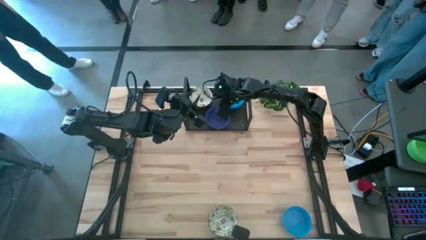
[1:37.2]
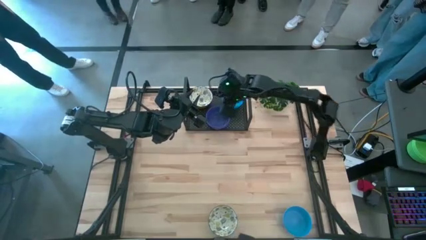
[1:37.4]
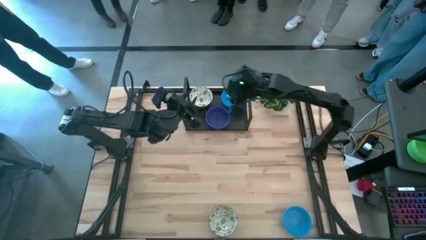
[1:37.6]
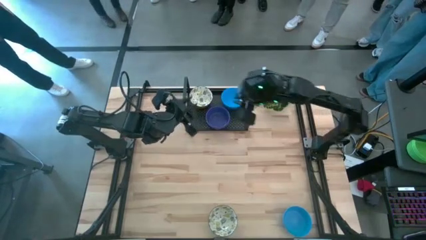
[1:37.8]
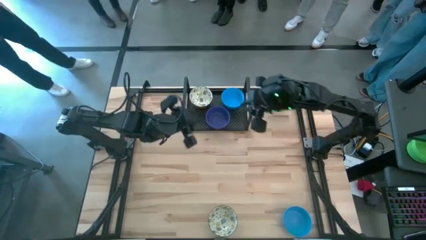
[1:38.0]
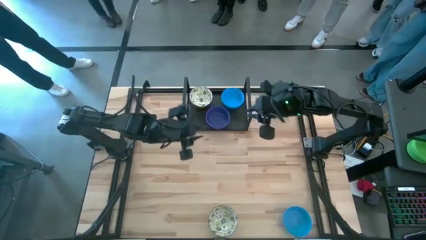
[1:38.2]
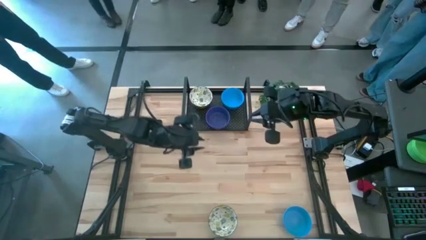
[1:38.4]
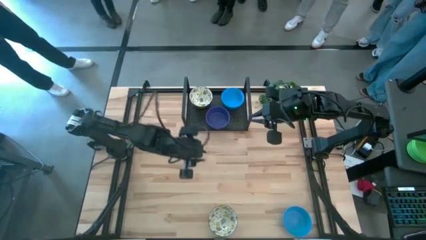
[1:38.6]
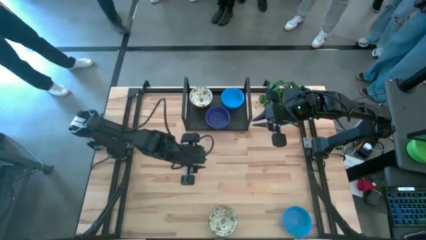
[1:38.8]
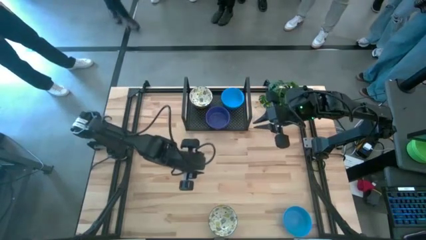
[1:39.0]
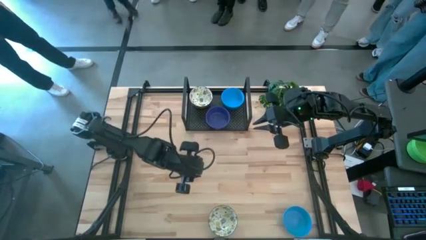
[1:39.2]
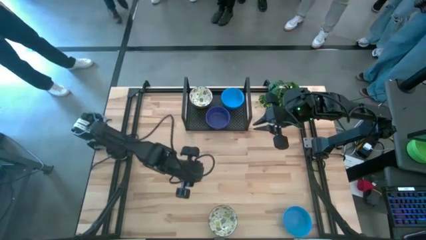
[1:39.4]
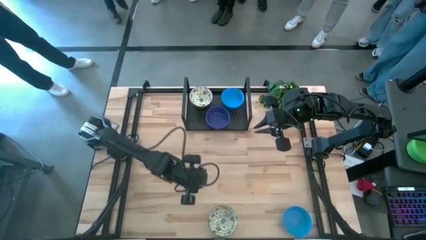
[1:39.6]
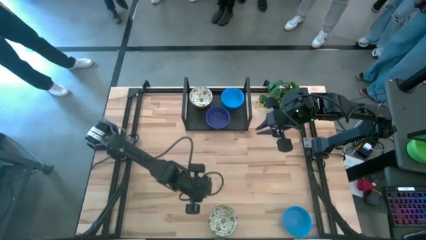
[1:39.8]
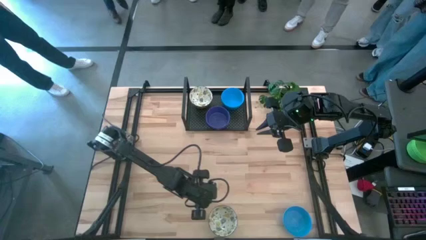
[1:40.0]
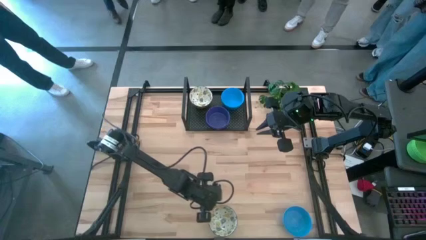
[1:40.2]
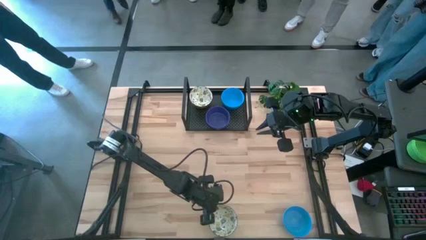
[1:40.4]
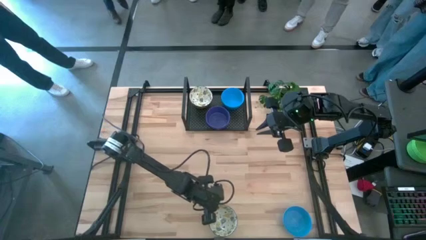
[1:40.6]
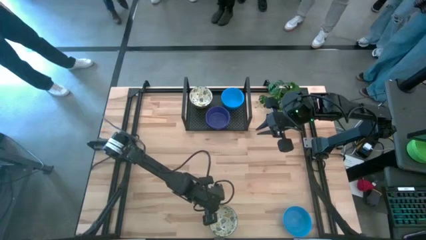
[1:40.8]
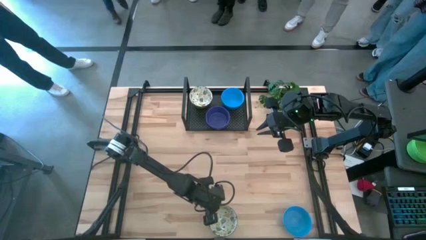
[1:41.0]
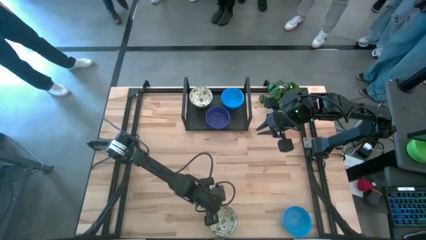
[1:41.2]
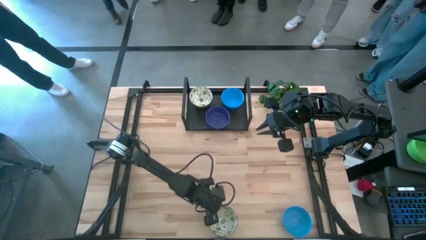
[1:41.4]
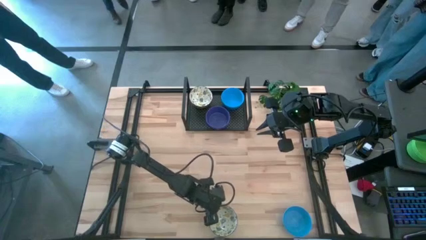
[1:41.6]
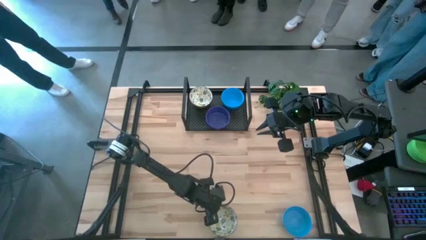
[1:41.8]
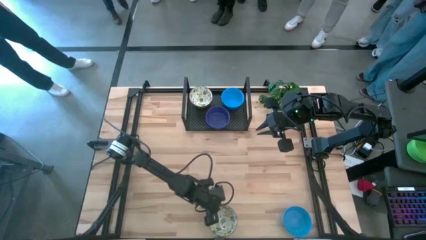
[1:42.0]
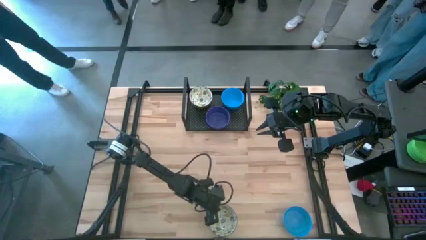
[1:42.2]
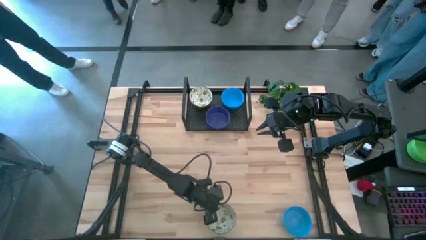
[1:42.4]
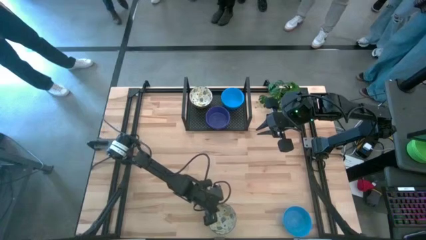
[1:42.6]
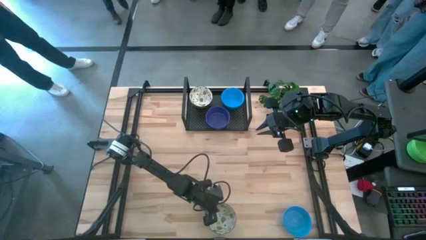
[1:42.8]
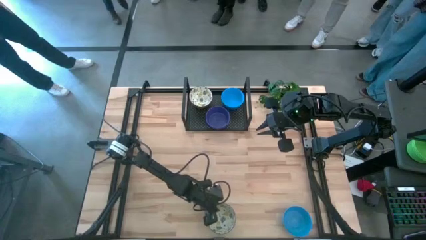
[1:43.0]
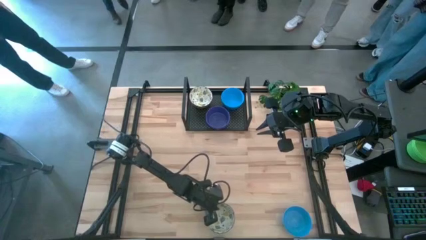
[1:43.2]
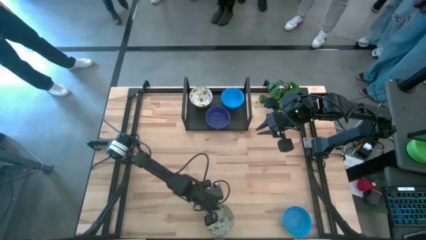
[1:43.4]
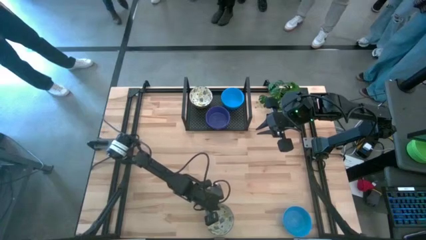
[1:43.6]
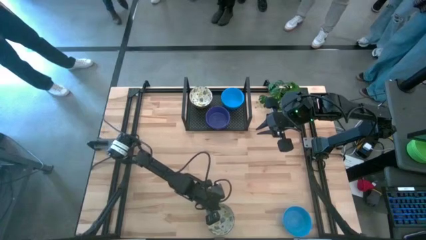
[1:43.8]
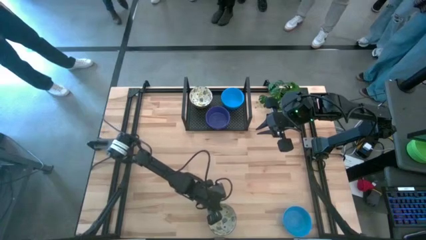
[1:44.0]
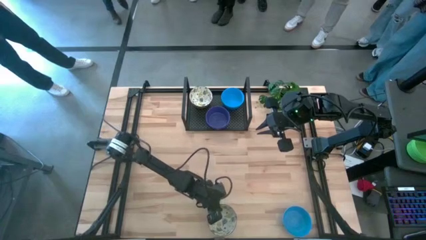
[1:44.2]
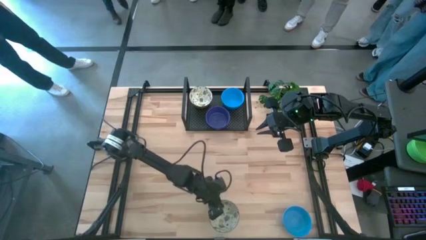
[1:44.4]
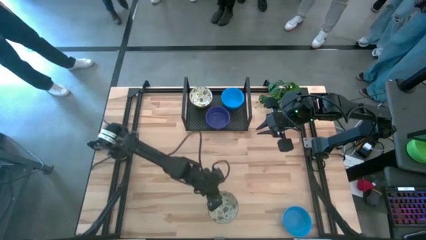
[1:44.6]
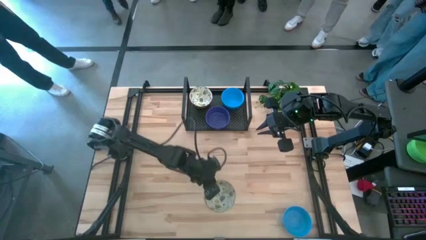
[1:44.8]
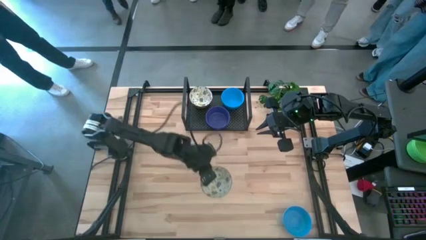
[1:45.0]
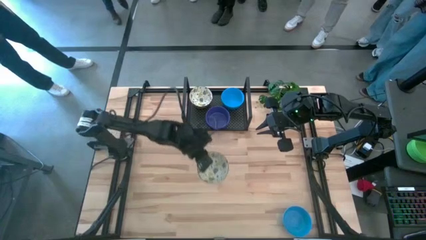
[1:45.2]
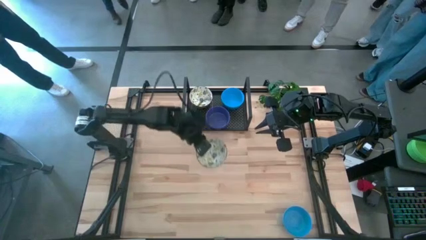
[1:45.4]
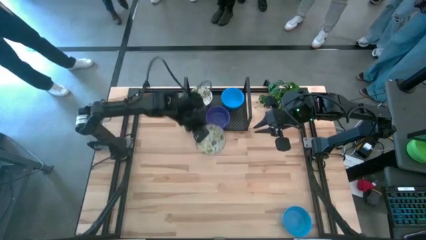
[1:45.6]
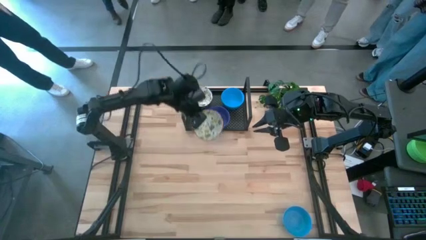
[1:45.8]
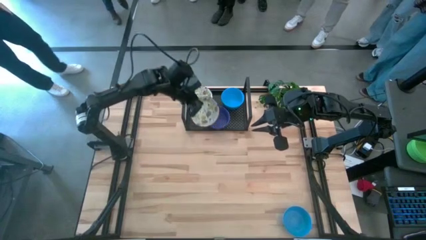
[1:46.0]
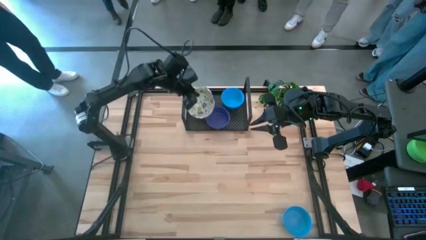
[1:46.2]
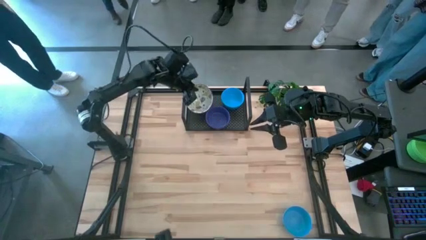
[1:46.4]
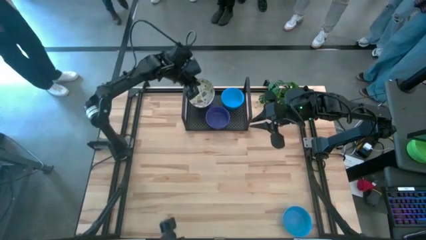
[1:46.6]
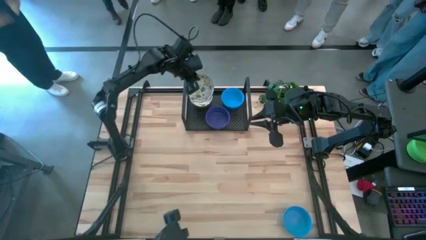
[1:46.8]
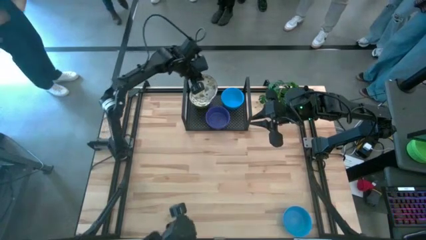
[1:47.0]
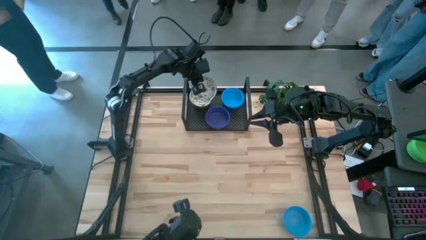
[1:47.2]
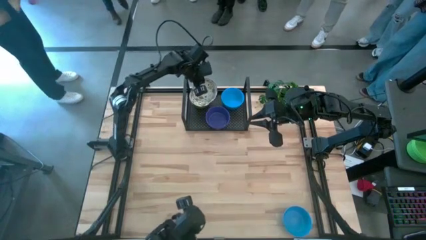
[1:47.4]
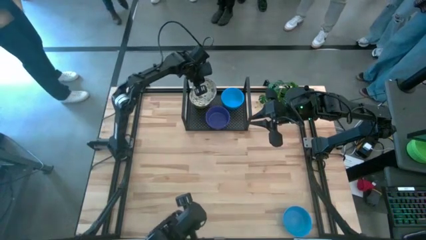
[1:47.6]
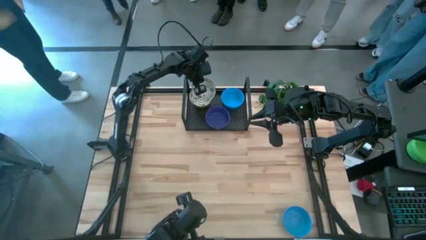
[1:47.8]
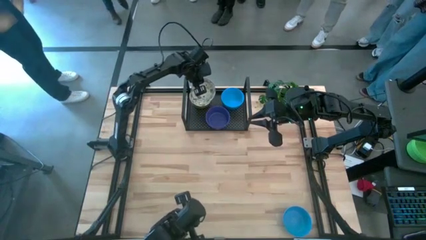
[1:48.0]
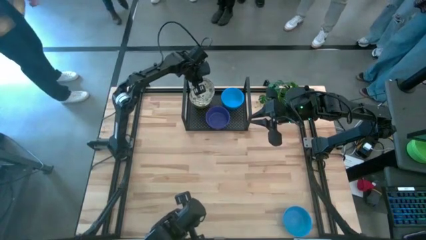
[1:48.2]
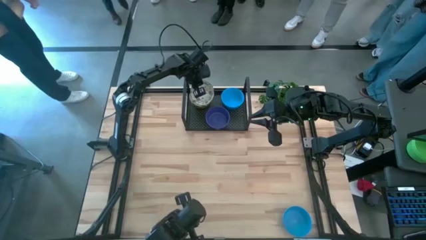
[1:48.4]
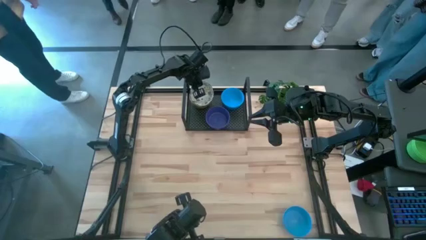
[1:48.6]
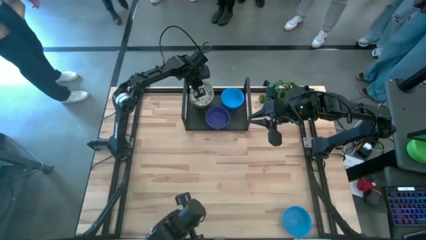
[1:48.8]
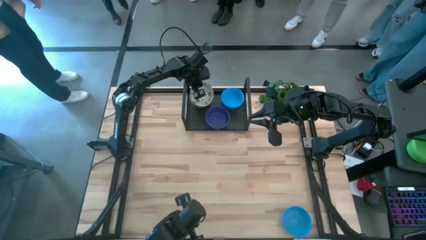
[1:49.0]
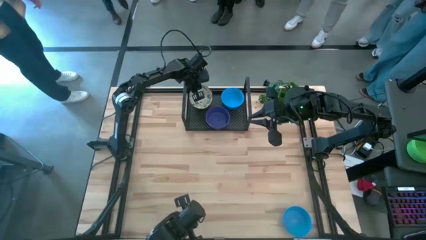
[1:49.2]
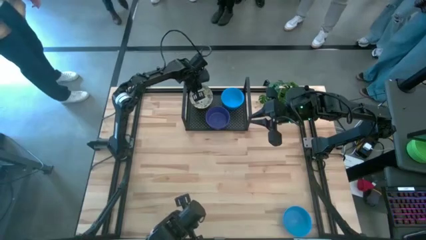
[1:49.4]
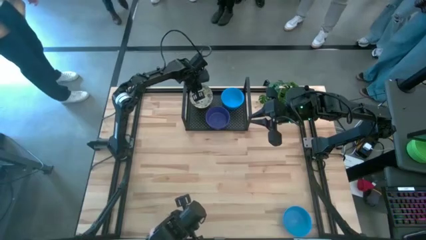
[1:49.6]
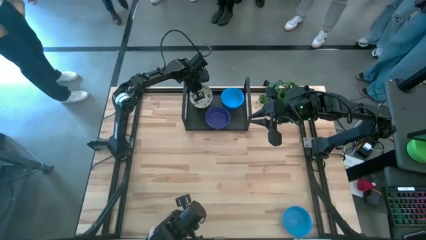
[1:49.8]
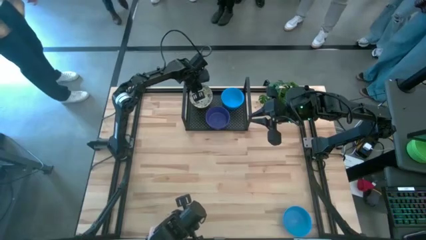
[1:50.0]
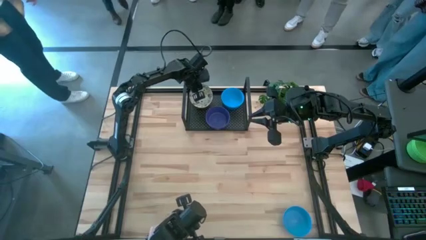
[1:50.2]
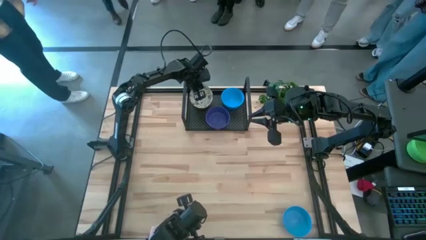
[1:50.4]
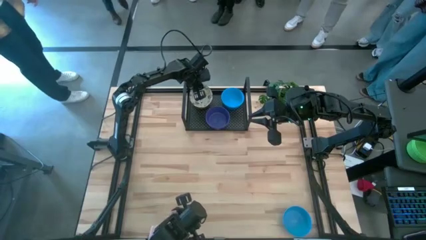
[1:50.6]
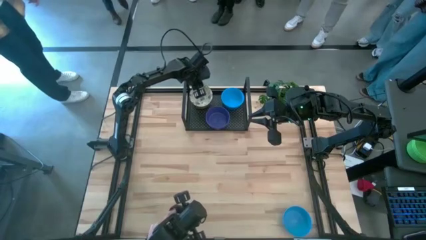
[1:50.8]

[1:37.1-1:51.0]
Task: Pick & Place Mini bowls
Stack the white bowl on top of the white bowls on the shelf

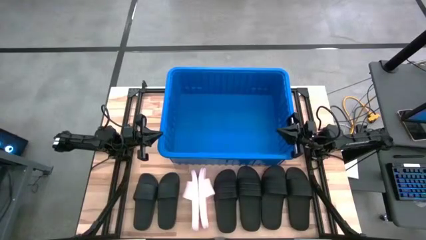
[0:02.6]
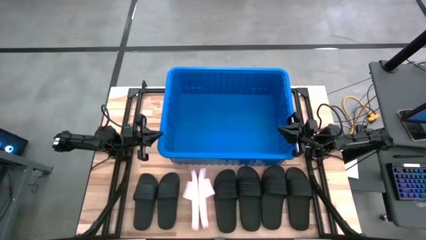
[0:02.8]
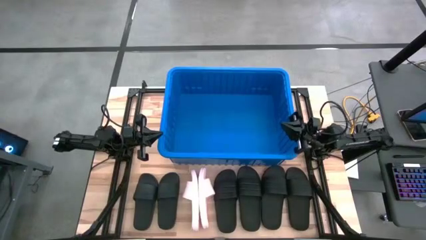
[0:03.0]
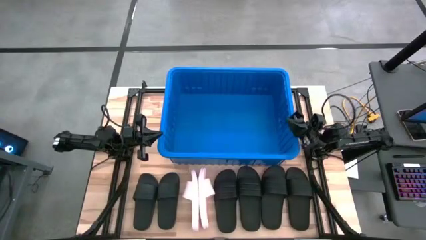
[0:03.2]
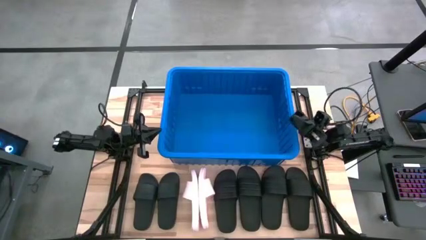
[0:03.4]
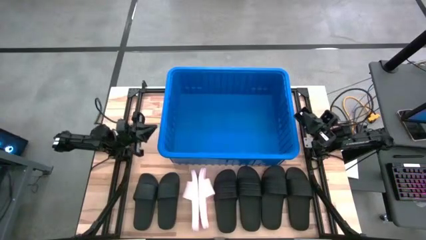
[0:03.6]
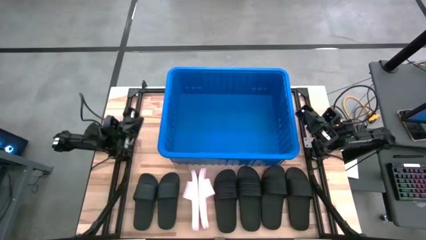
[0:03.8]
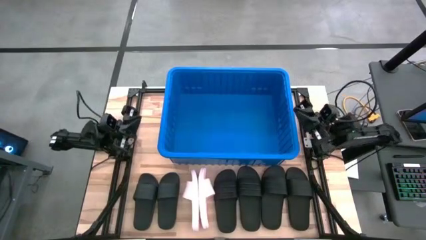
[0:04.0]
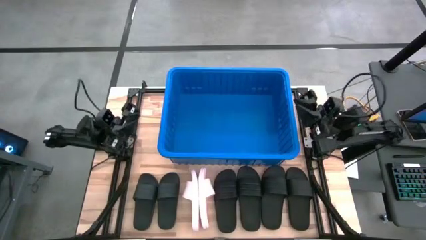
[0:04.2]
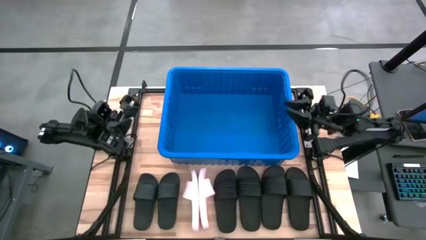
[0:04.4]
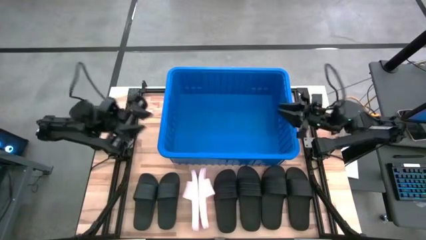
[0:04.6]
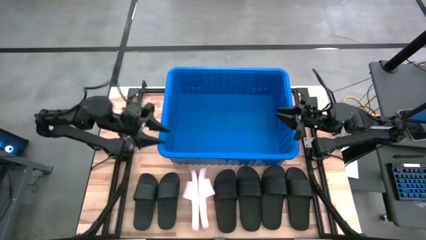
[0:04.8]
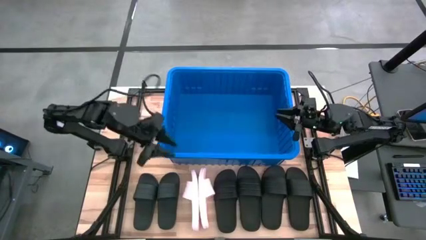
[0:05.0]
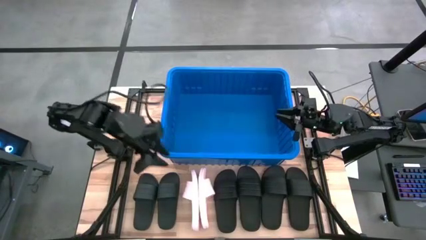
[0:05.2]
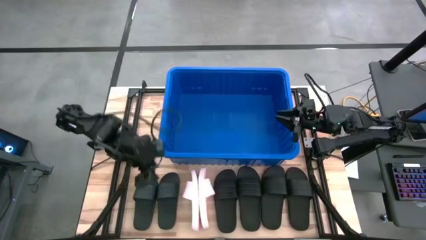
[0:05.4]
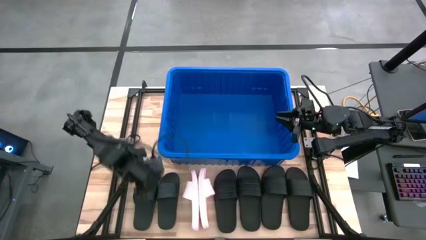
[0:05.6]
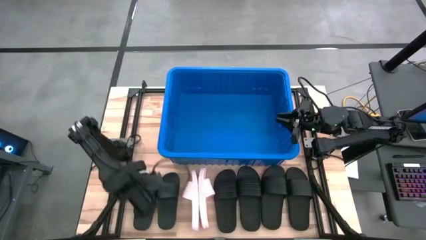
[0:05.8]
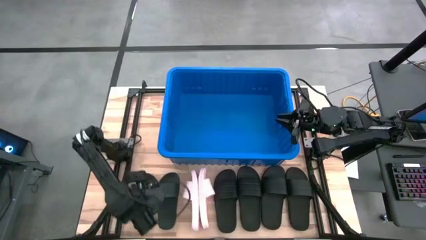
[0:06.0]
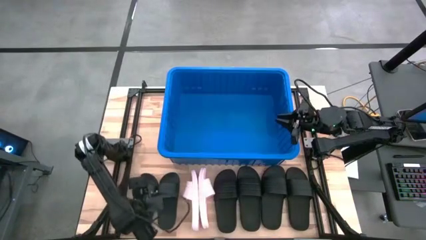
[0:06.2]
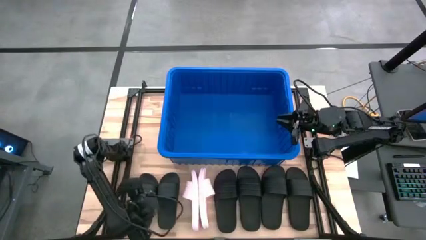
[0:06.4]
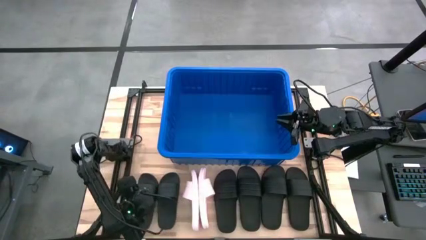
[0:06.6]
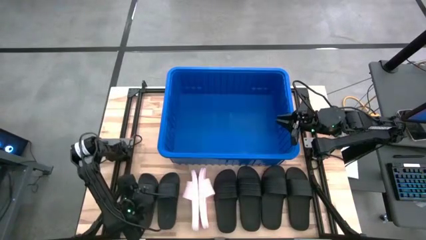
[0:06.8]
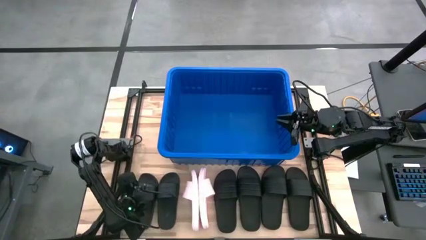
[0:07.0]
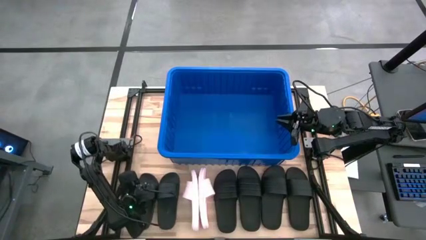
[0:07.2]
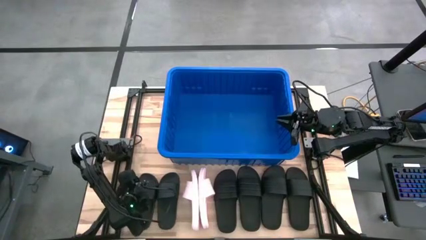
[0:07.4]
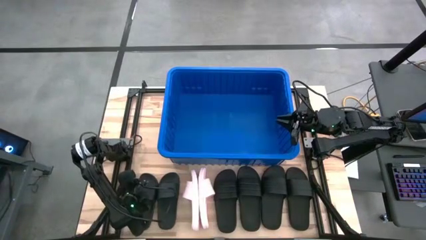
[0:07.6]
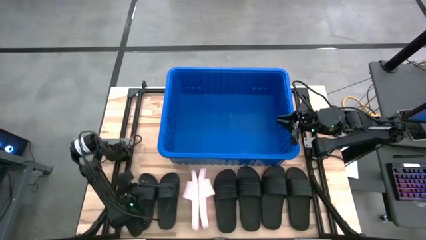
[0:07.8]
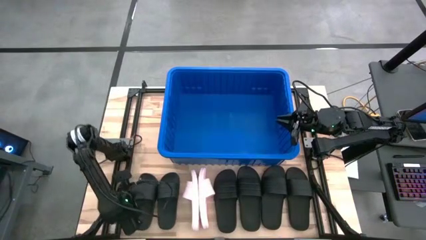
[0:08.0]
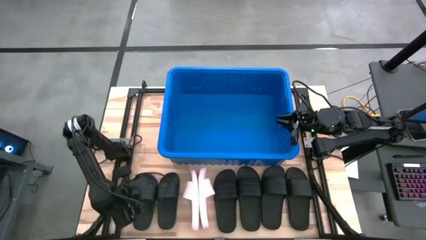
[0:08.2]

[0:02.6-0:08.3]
Task: Pick and place slides into bin
Put the black slide into the blue container
